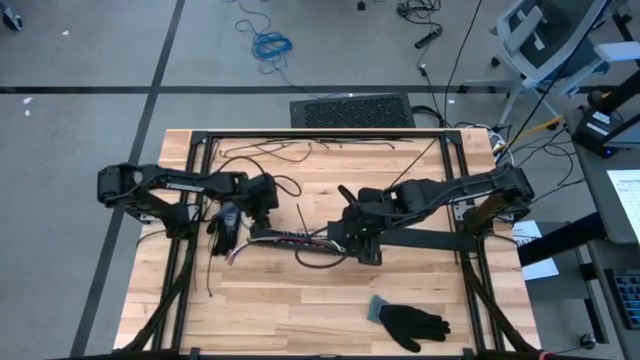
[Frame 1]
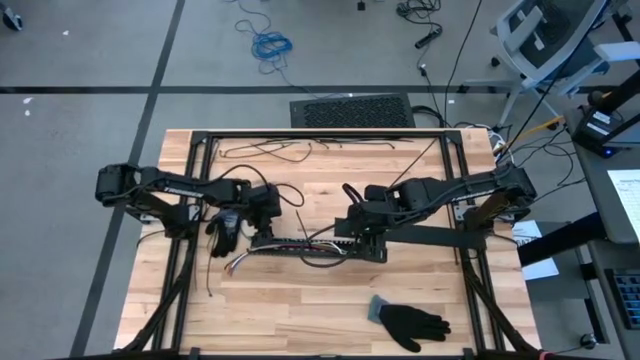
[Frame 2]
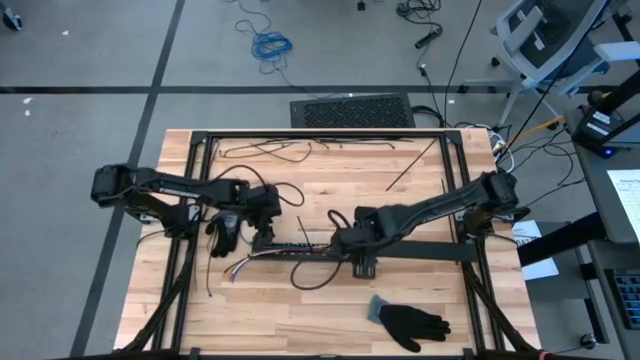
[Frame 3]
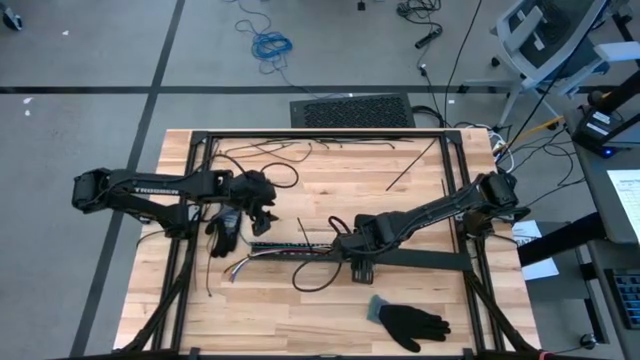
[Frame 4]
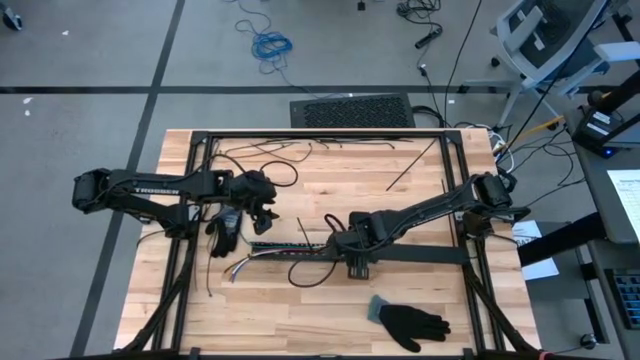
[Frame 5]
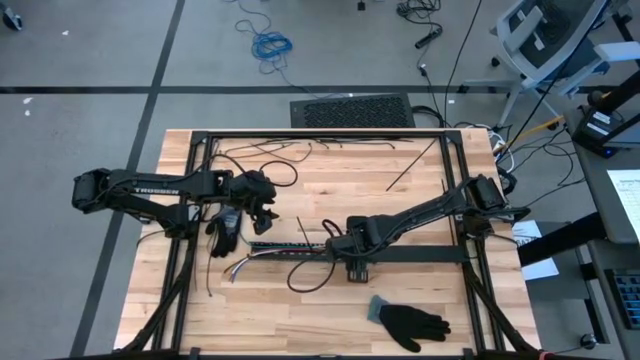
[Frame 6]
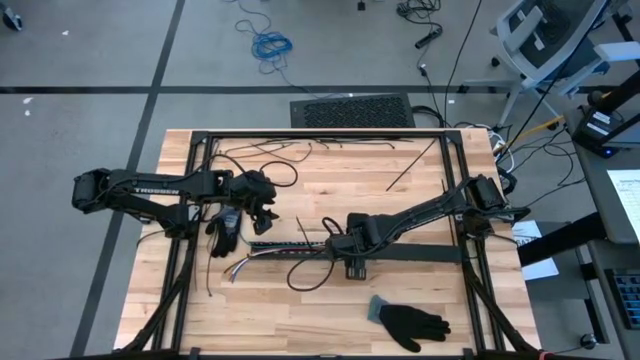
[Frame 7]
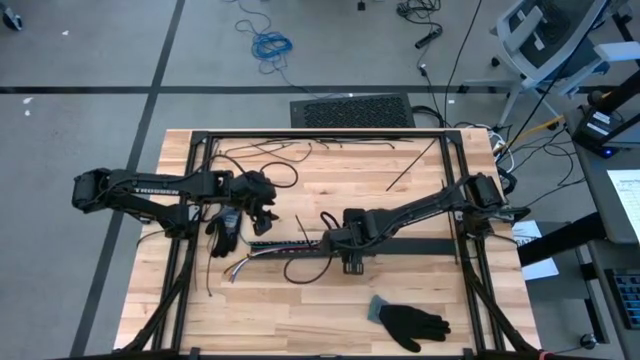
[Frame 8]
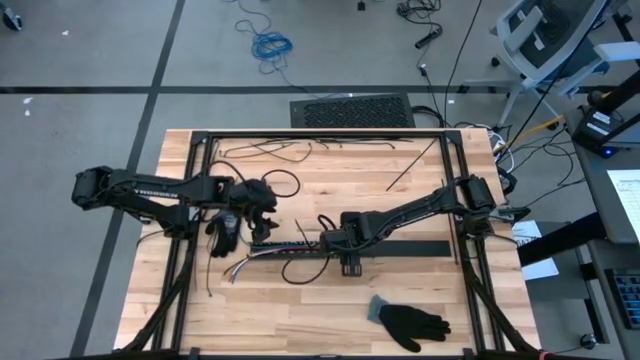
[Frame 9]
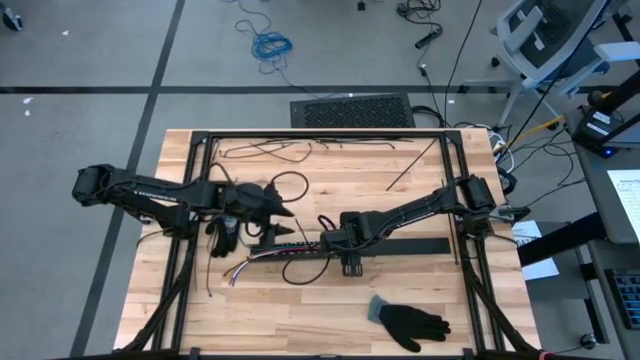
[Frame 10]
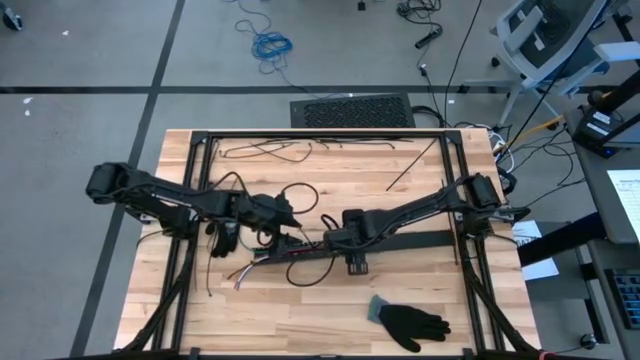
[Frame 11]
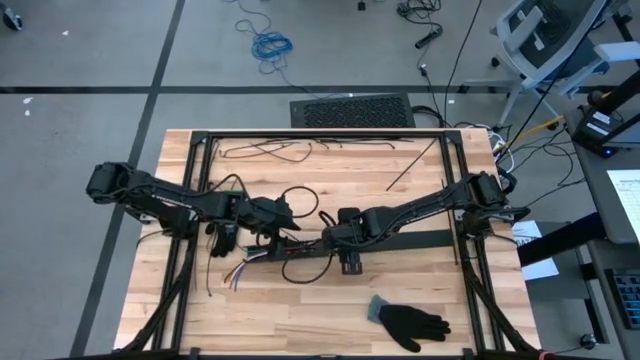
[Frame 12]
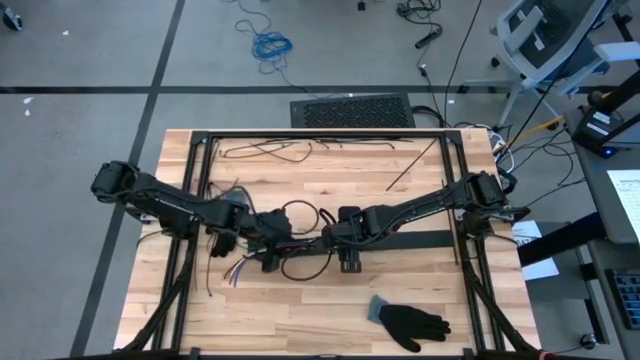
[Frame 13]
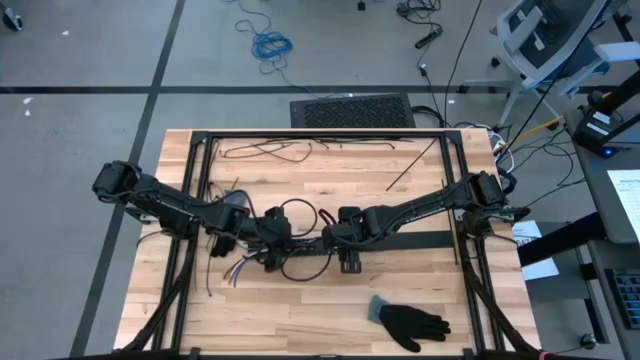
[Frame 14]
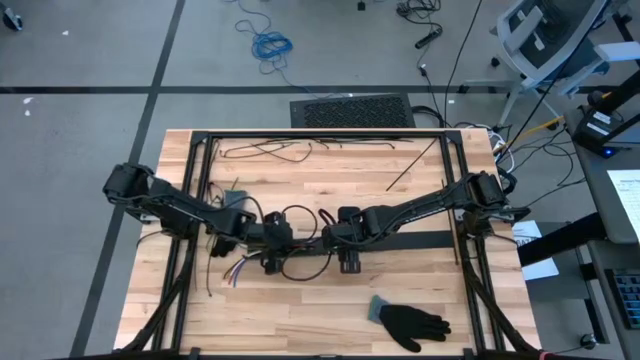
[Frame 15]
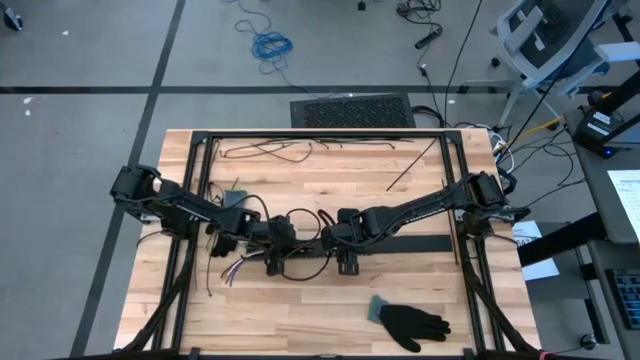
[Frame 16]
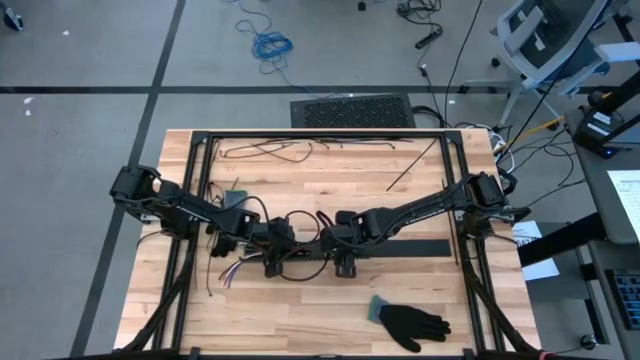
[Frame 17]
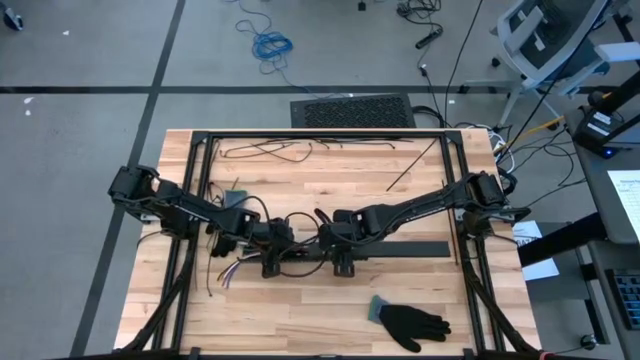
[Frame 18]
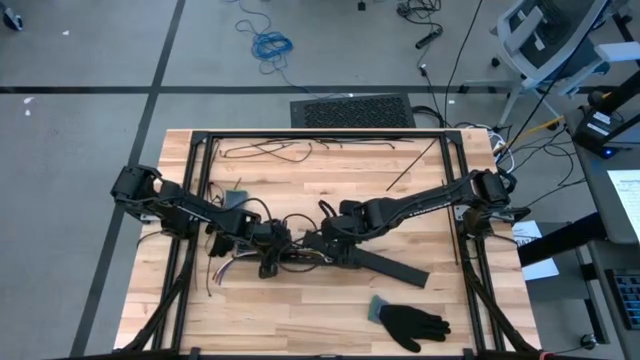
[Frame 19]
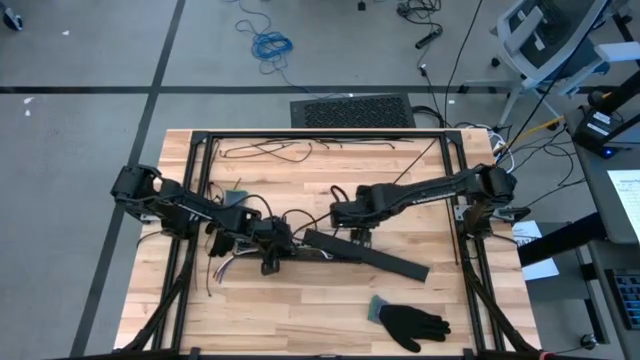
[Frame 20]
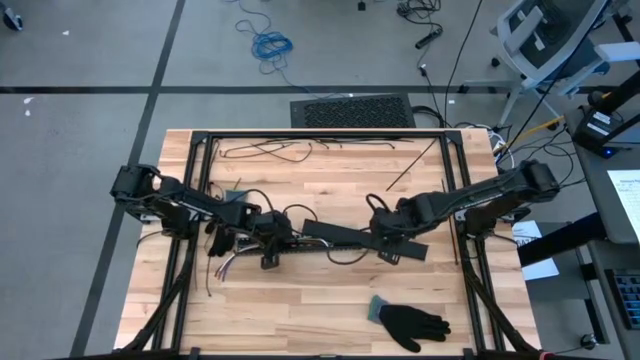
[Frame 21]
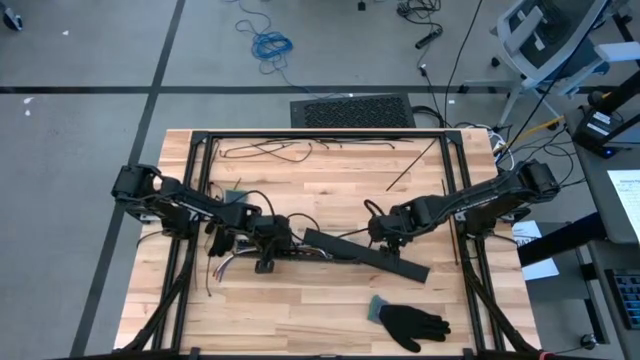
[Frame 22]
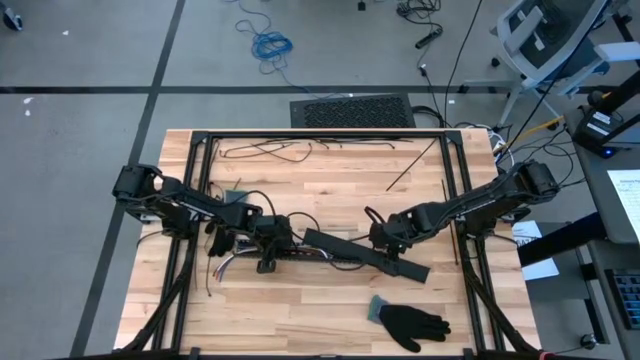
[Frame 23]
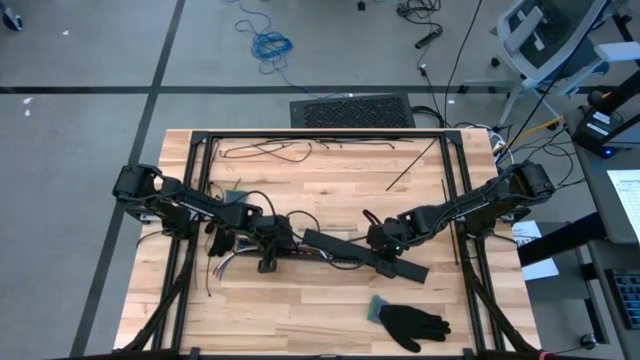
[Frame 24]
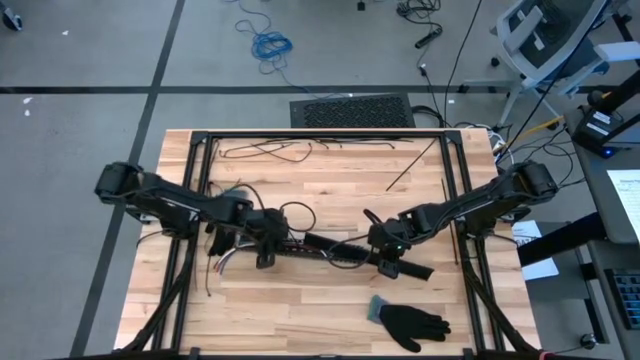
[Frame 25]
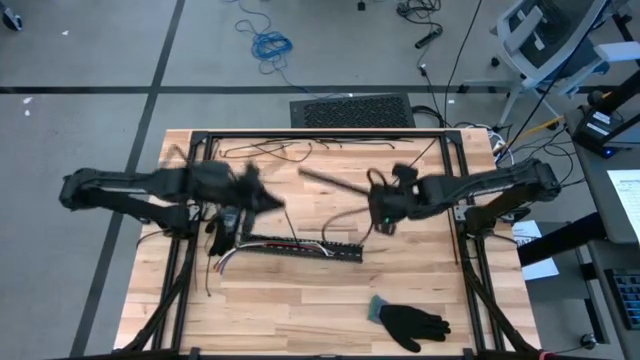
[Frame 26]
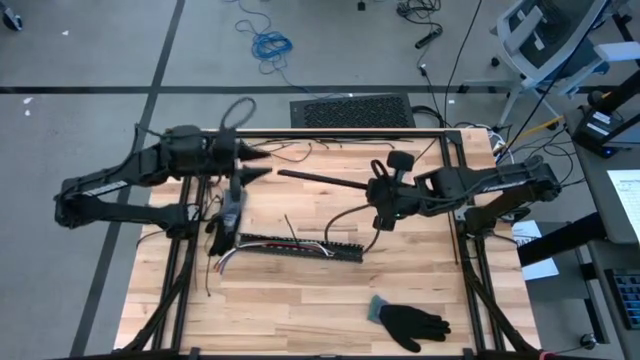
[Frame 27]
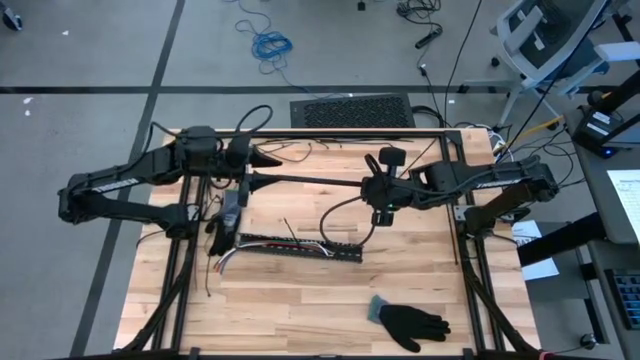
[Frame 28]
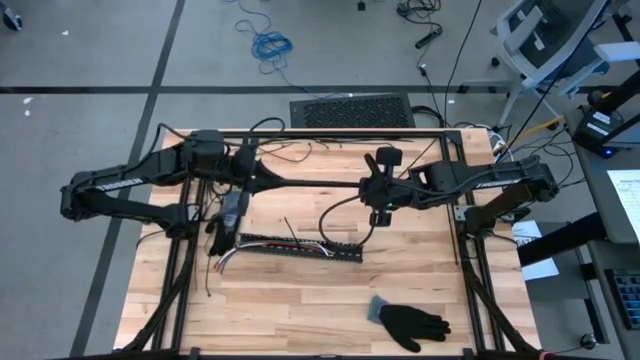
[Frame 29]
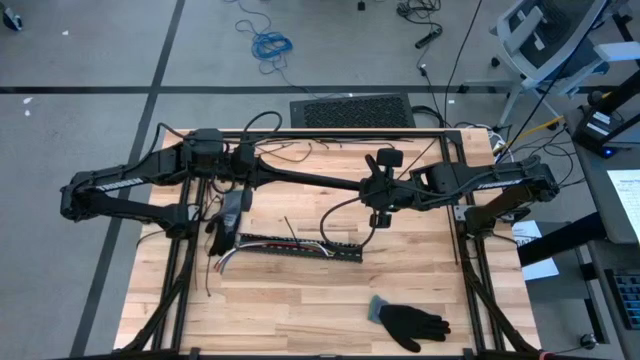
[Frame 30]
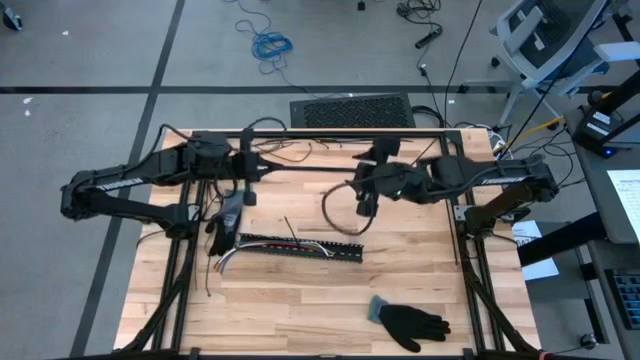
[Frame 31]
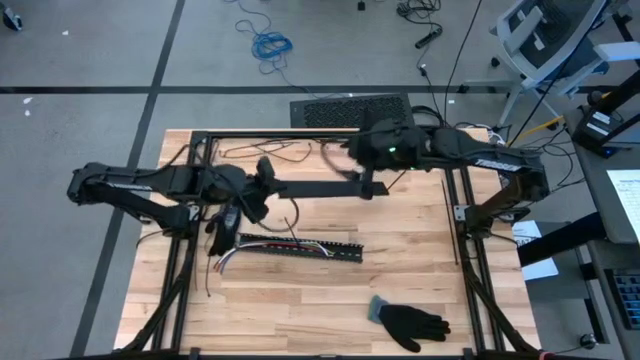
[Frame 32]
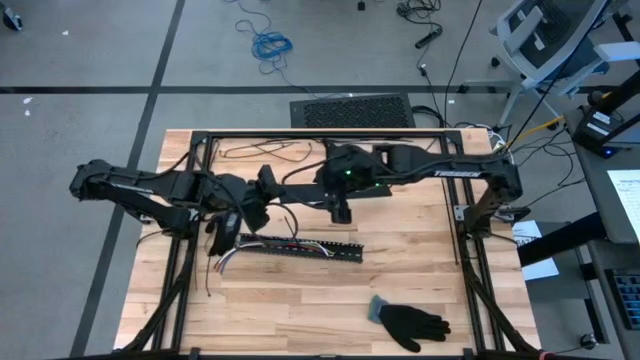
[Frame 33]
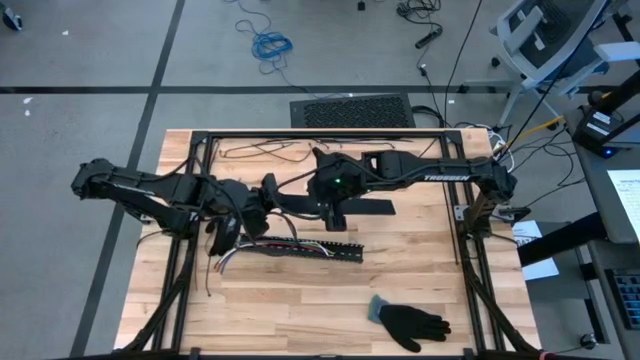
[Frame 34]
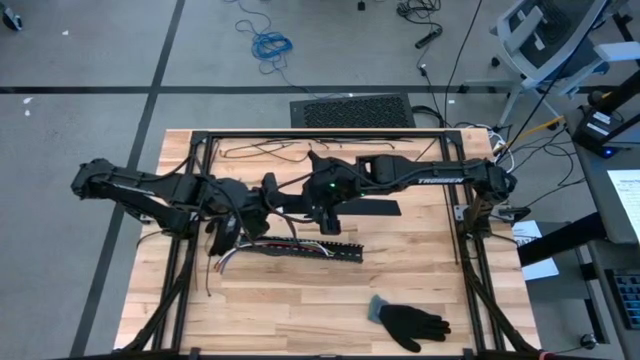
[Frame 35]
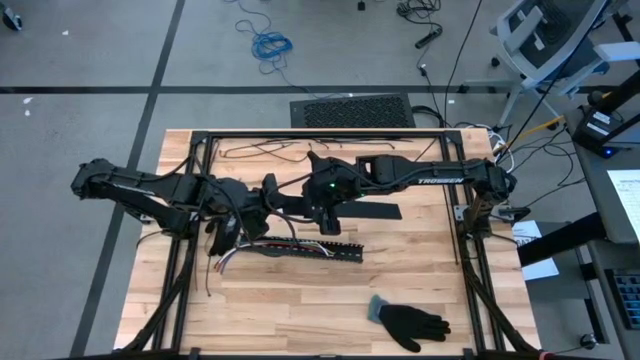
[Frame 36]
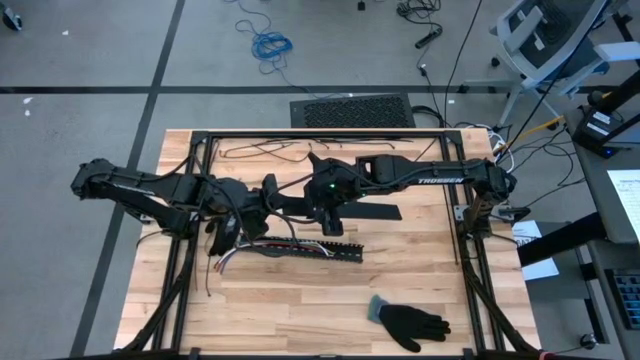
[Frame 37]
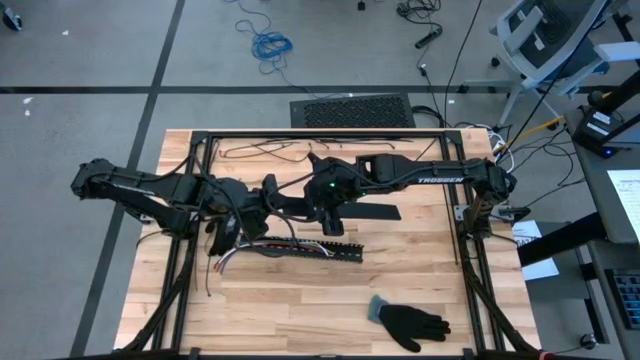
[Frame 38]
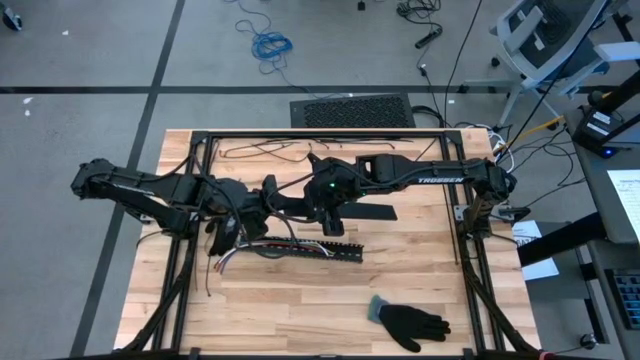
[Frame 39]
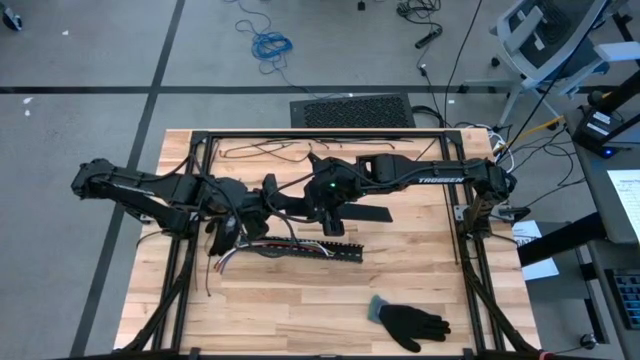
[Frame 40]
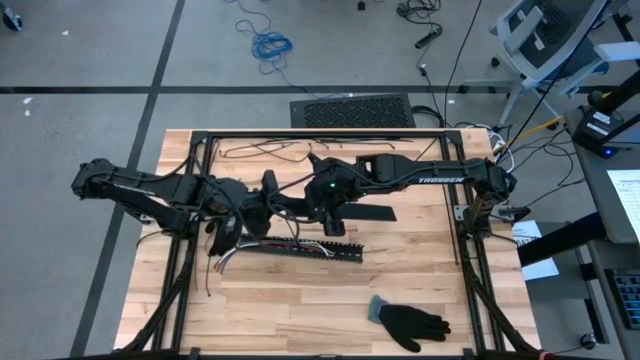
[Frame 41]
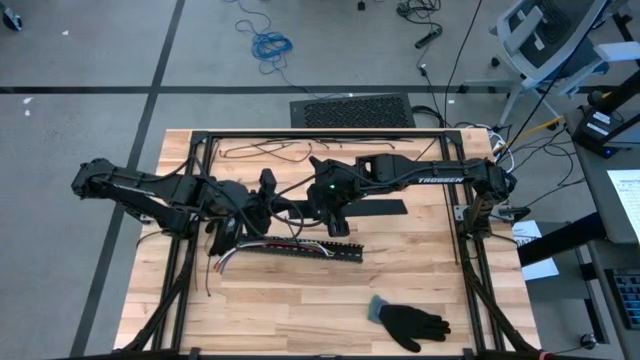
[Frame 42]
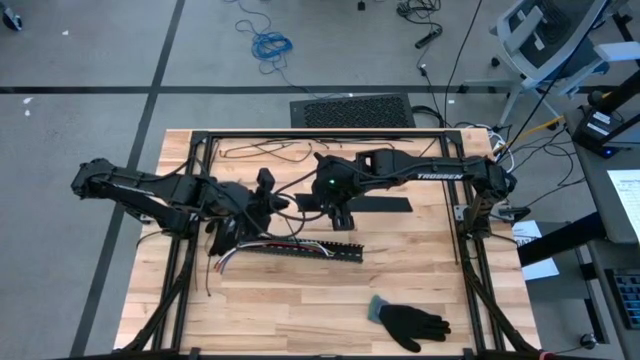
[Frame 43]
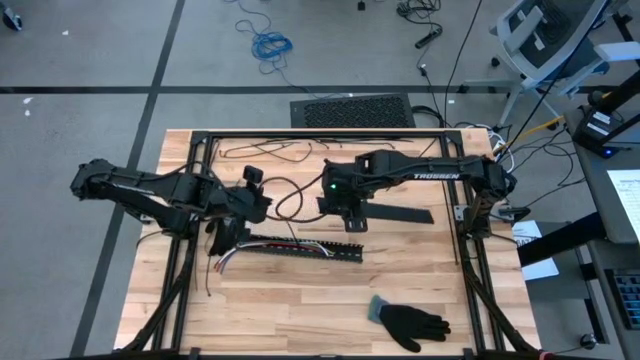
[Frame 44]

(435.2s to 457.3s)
Task: Ziptie cables
Close the cable duct with the cable duct cover
